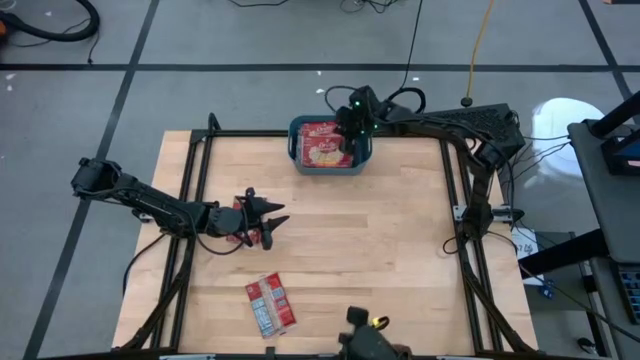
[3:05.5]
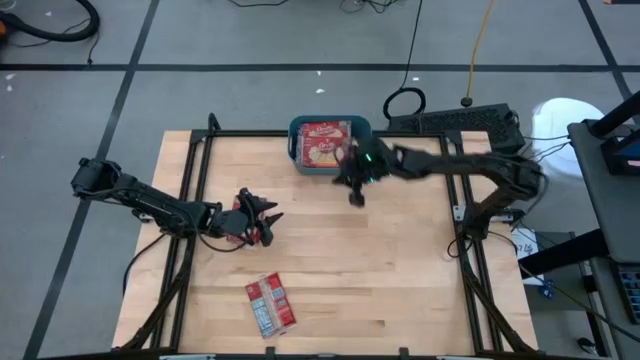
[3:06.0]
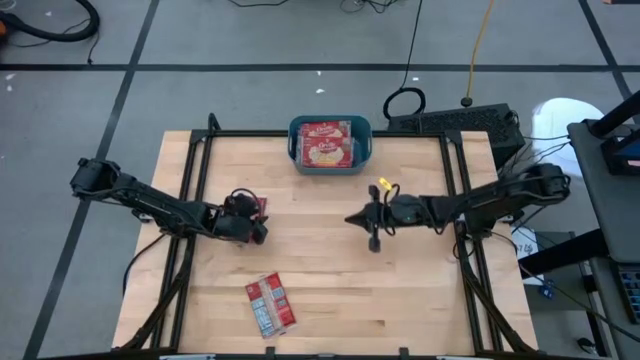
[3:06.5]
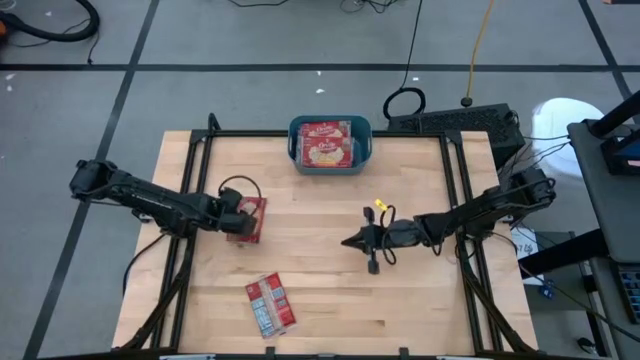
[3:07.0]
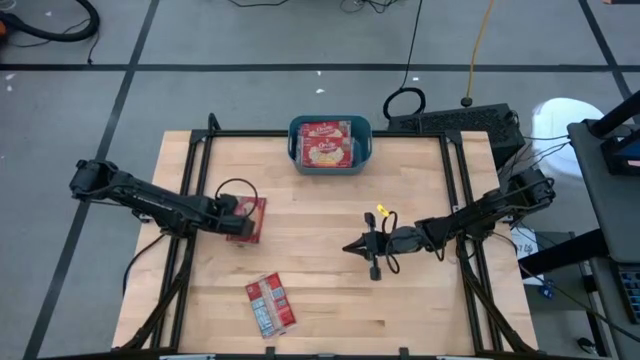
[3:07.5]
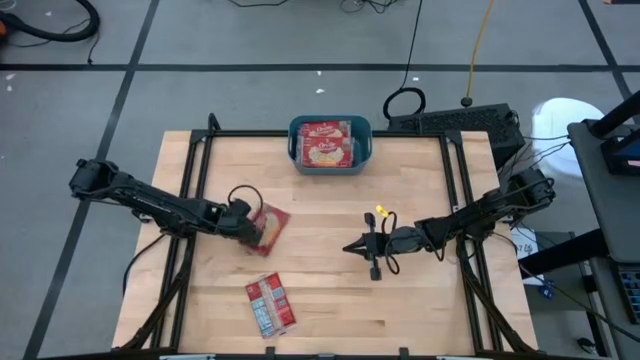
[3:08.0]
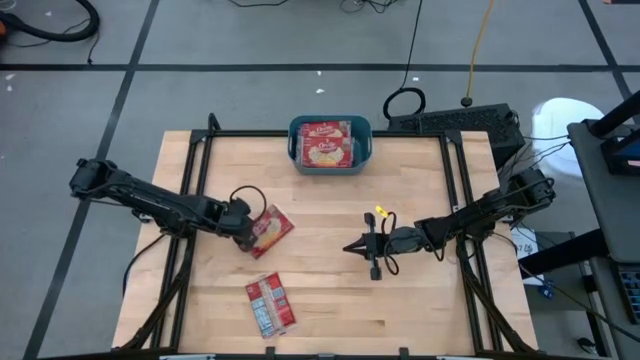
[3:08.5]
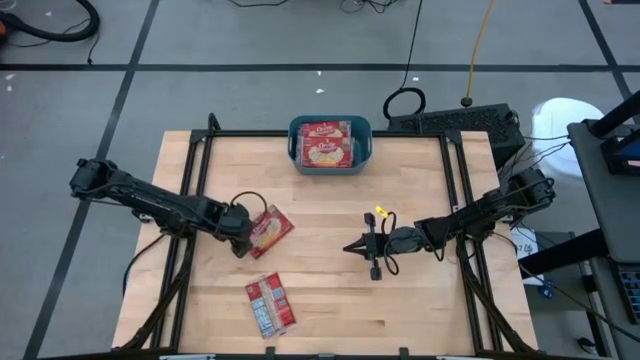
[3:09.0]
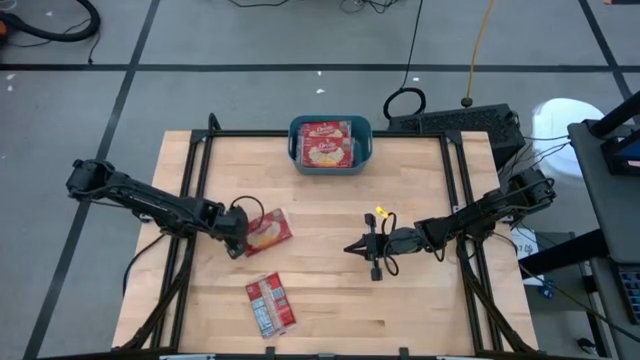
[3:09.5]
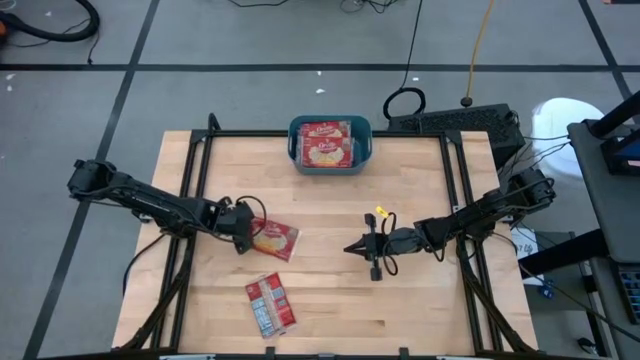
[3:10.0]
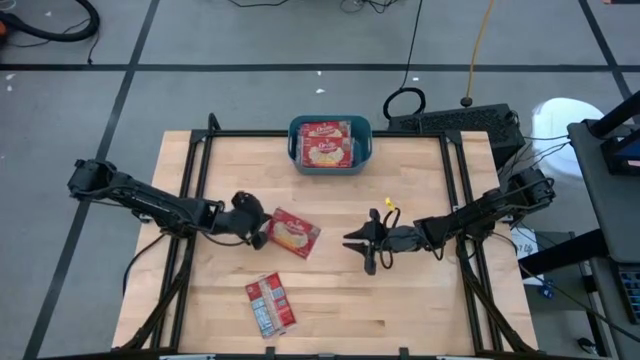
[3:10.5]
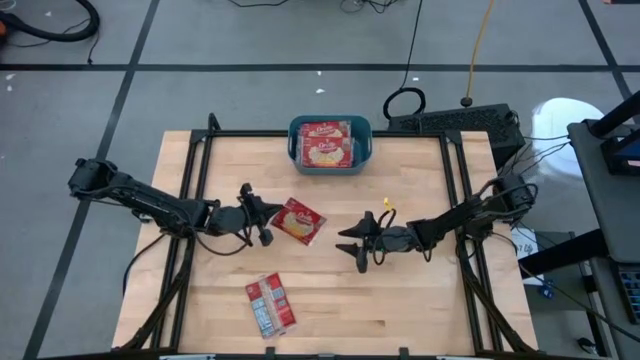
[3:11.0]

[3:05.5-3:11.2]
Task: Sort popcorn bags into baskets
Put the red popcorn bag into the blue bin

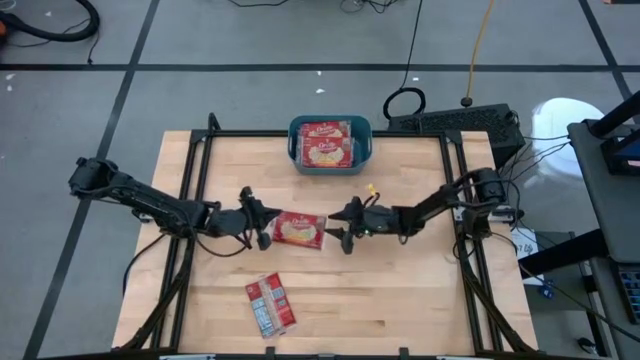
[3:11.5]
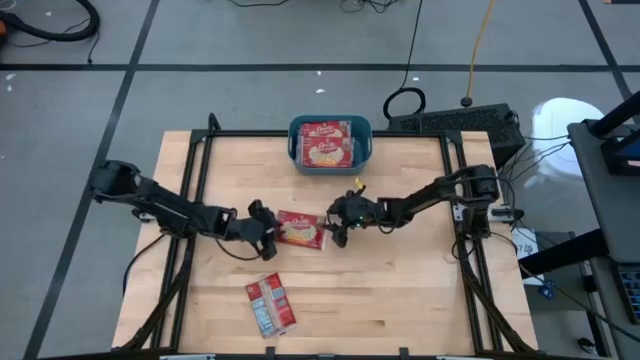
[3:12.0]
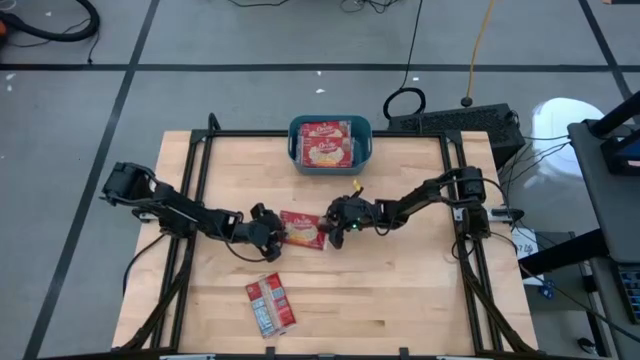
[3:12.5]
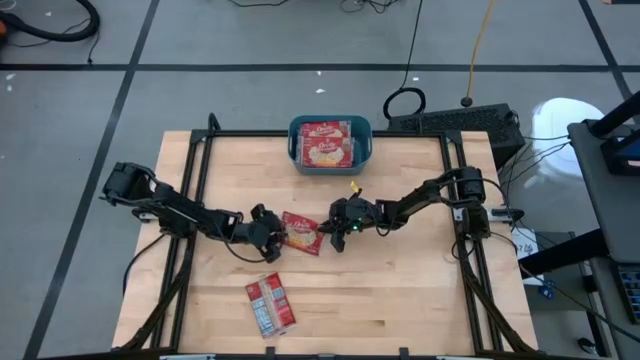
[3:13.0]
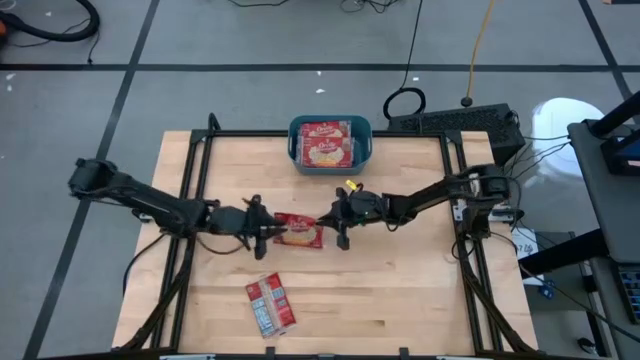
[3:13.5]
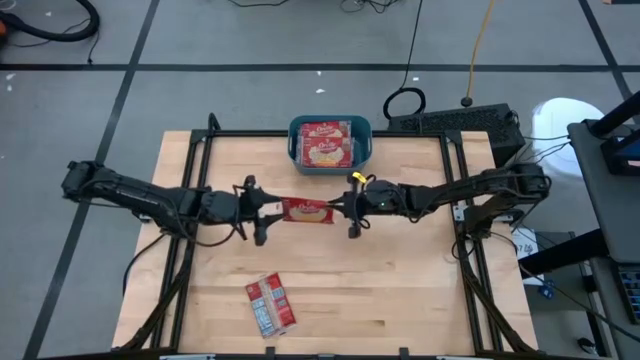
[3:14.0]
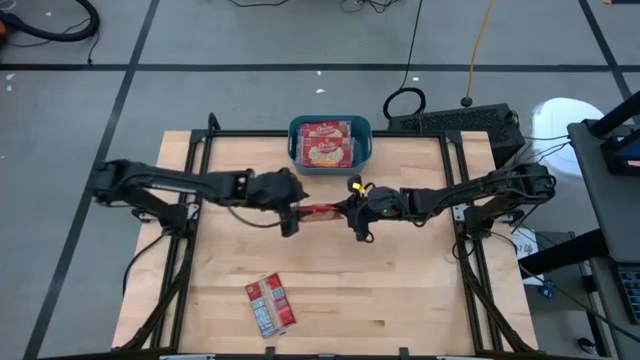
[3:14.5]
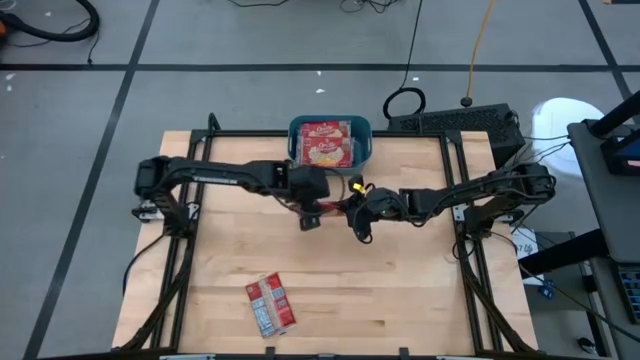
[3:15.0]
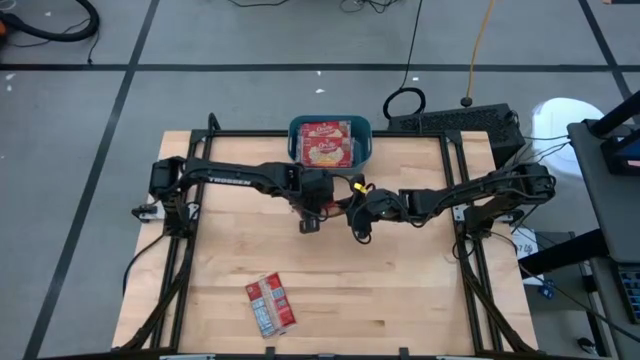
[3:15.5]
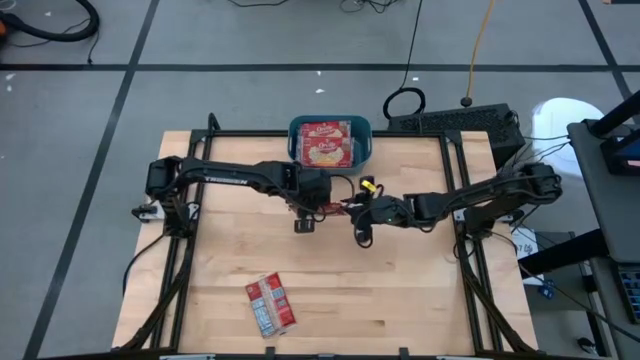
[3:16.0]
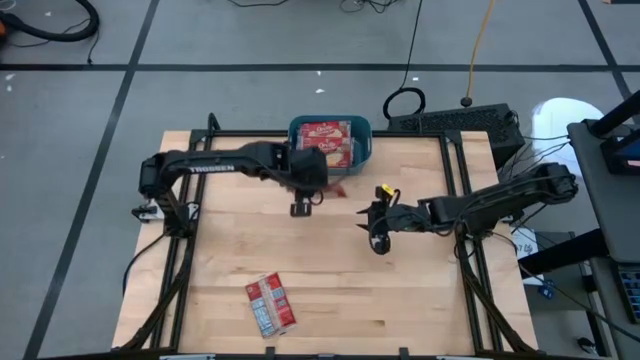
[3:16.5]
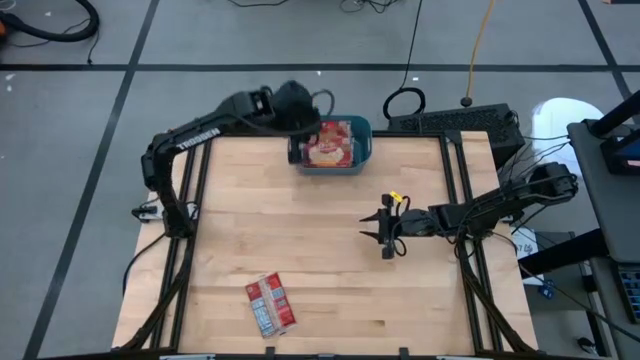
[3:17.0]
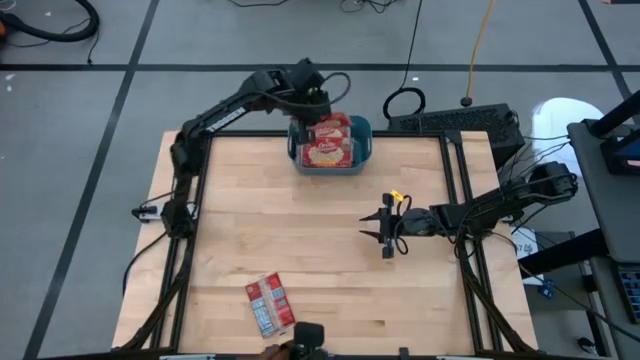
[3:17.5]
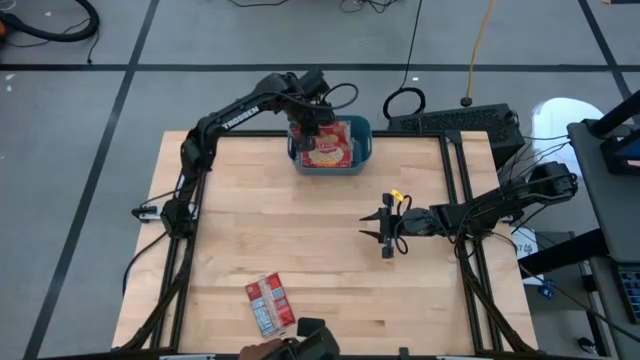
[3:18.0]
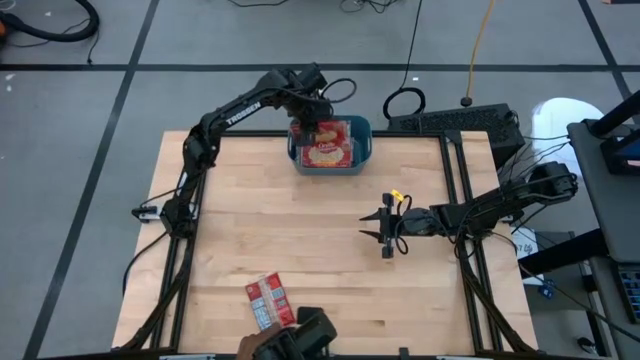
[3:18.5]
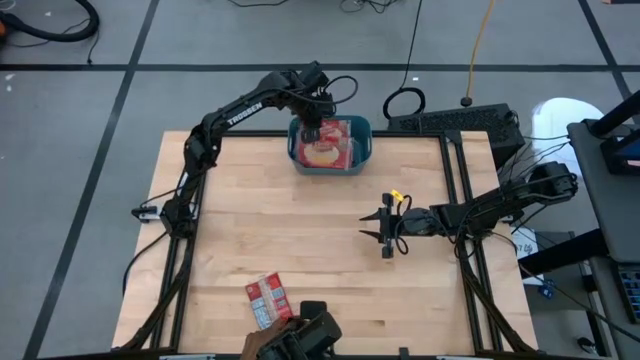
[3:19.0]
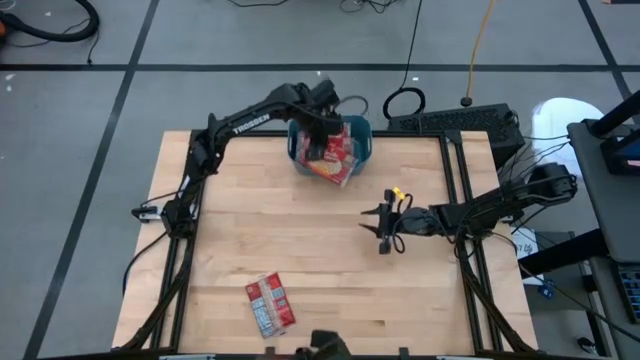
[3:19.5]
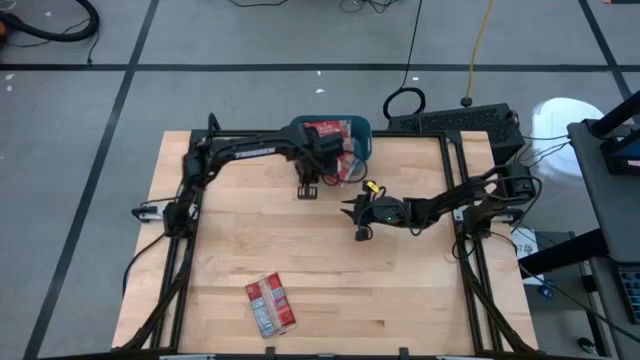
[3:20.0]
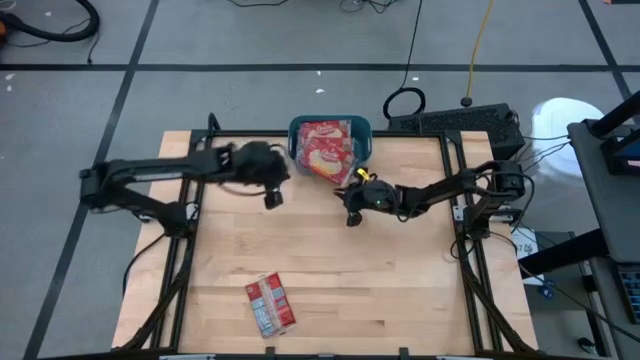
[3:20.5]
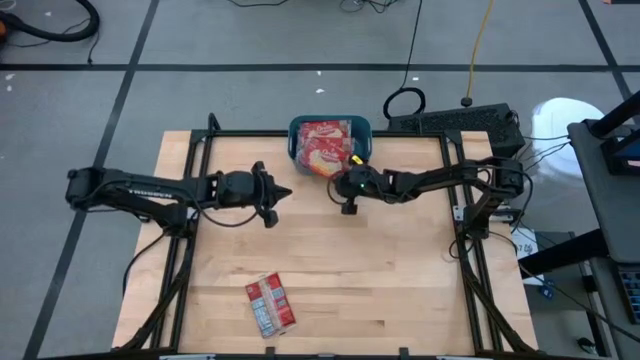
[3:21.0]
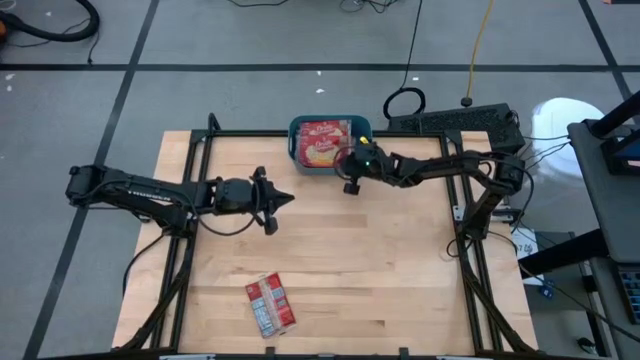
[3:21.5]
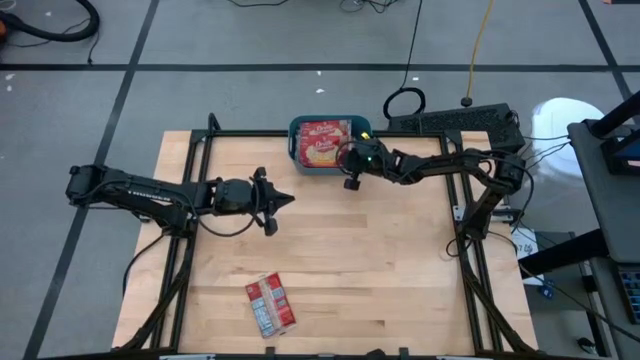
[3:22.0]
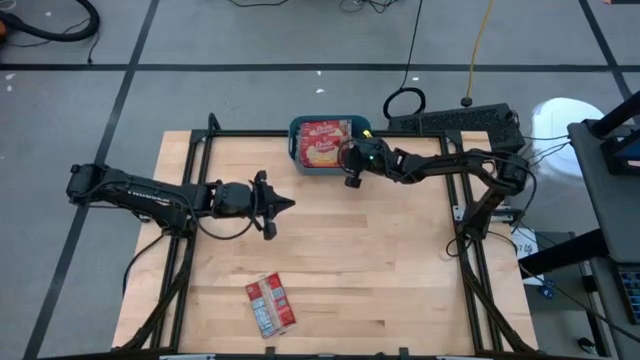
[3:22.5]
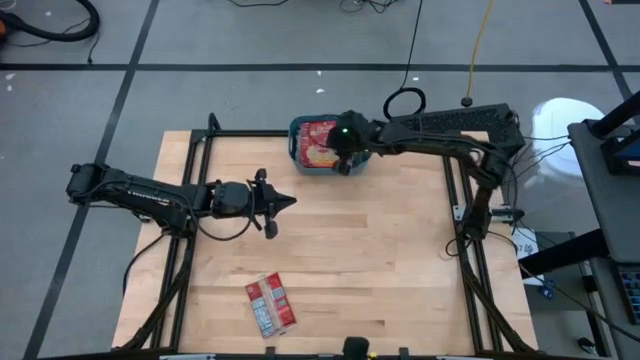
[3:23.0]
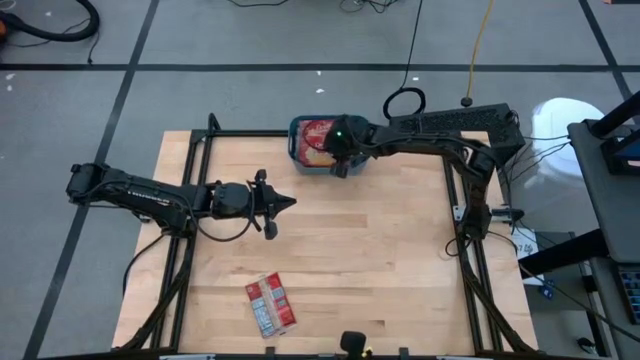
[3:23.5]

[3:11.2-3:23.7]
Put the red popcorn bag into the blue bin

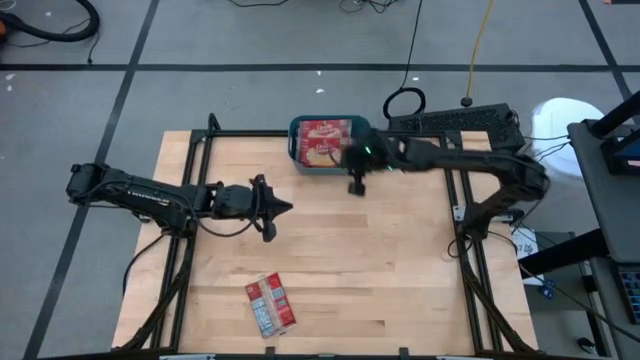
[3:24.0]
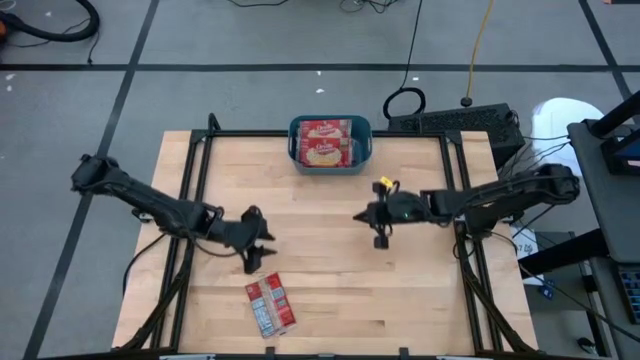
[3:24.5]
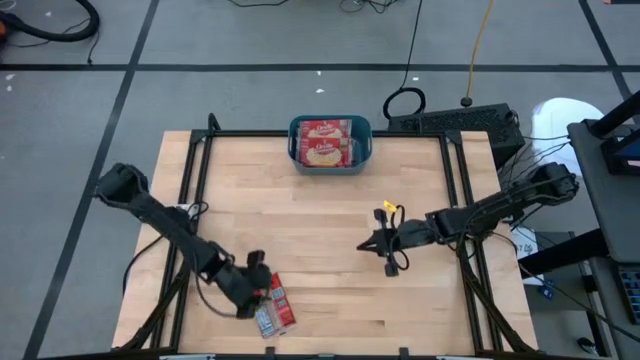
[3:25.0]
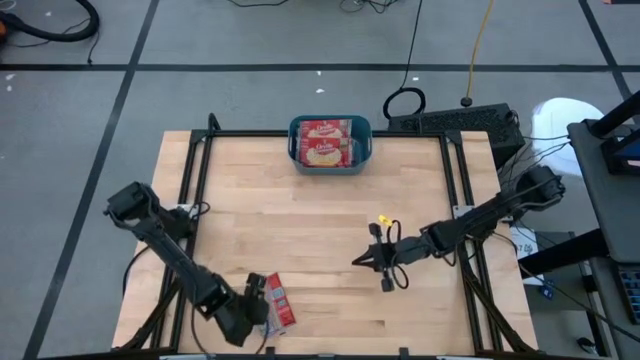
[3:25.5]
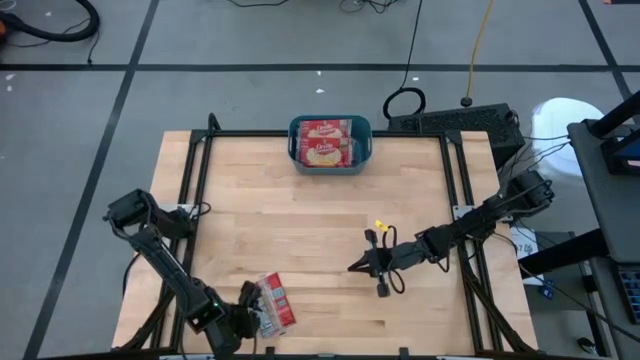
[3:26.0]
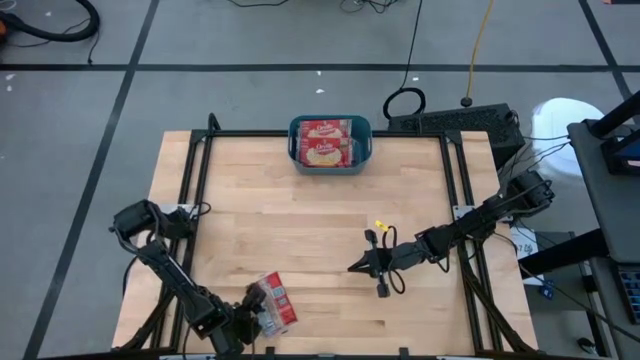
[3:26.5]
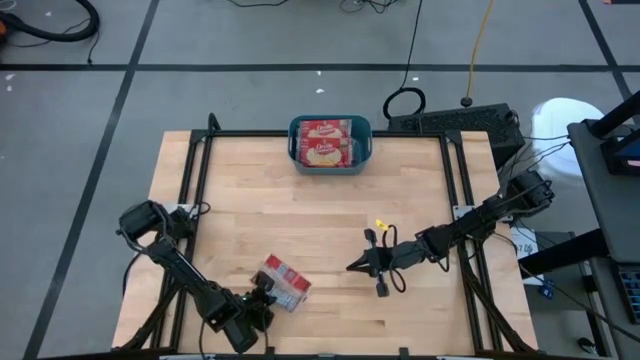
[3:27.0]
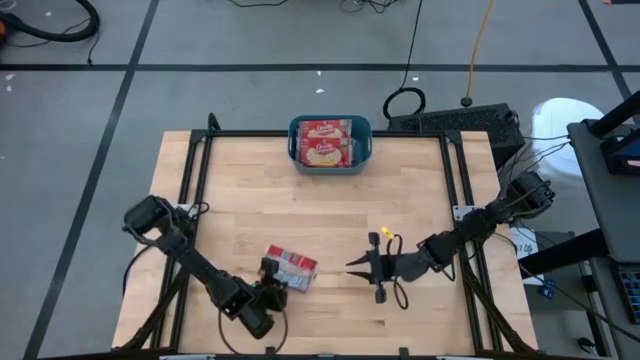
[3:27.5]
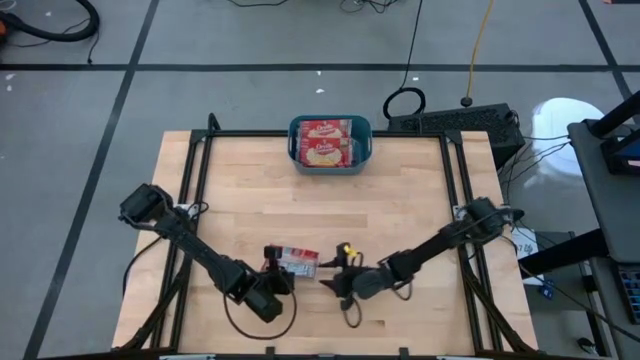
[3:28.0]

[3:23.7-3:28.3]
Put the red popcorn bag into the blue bin
